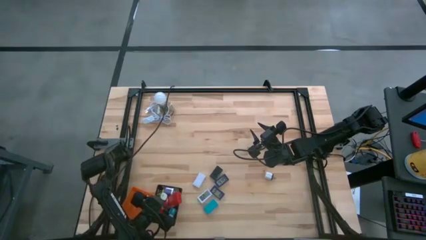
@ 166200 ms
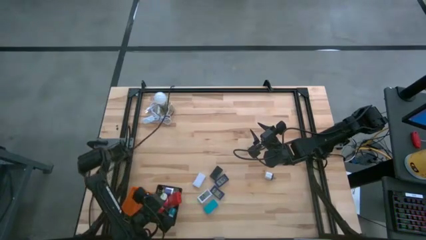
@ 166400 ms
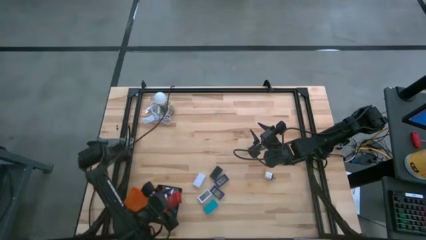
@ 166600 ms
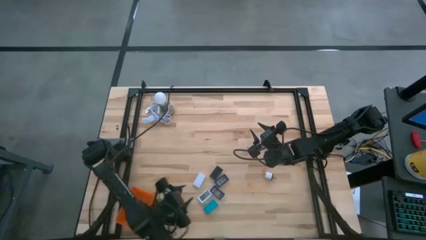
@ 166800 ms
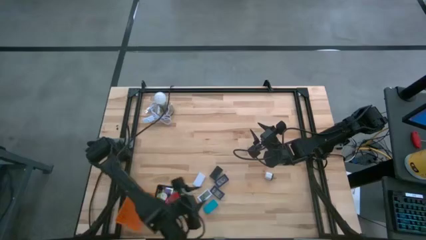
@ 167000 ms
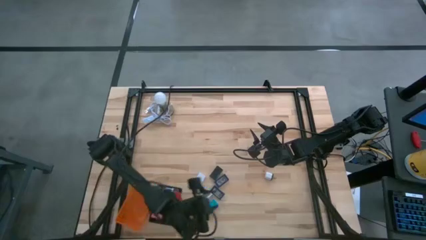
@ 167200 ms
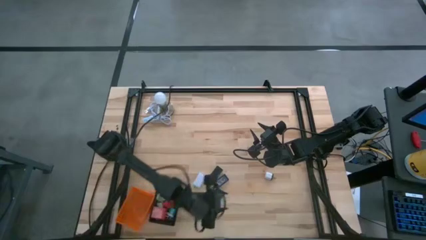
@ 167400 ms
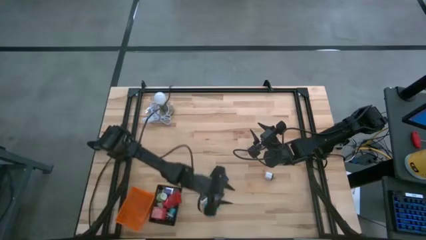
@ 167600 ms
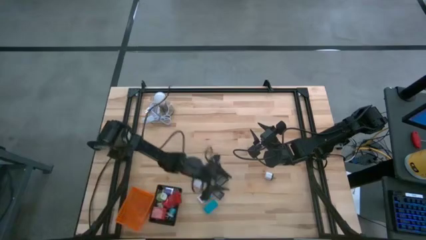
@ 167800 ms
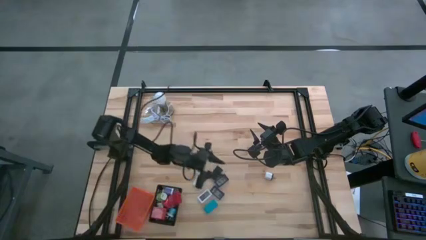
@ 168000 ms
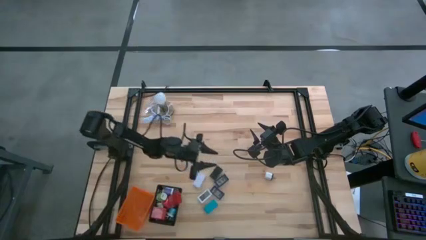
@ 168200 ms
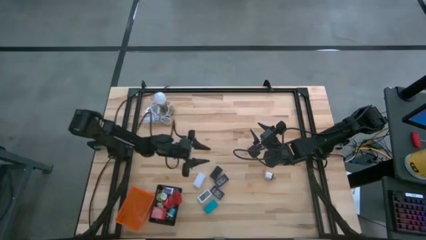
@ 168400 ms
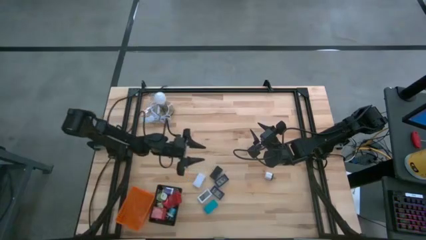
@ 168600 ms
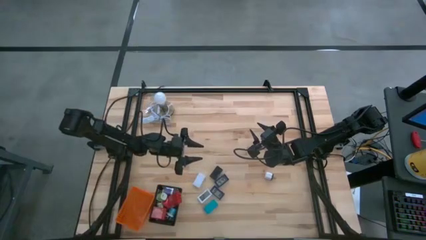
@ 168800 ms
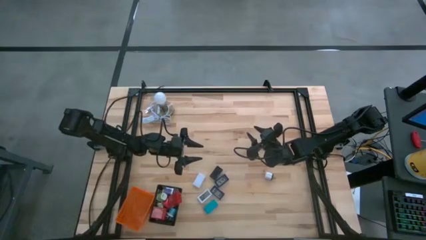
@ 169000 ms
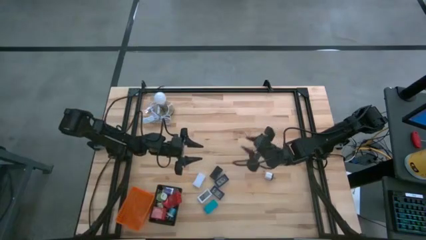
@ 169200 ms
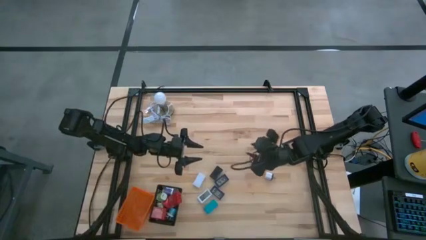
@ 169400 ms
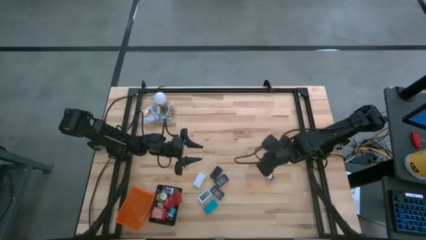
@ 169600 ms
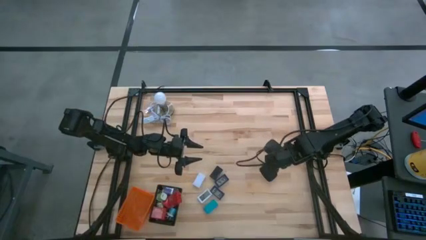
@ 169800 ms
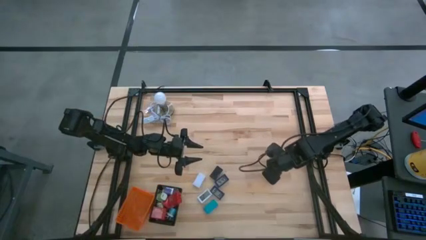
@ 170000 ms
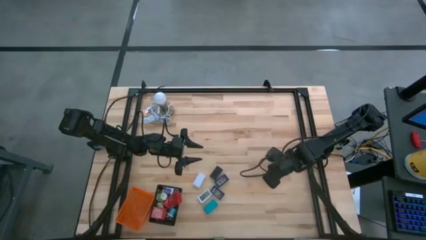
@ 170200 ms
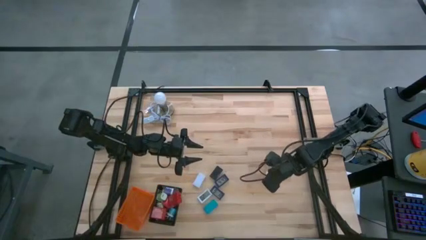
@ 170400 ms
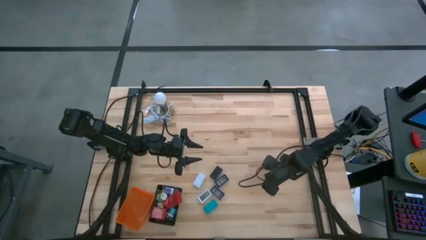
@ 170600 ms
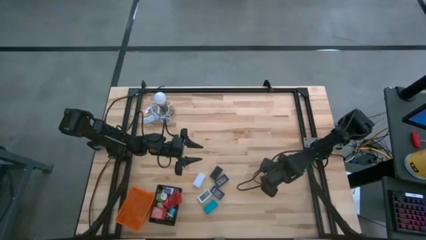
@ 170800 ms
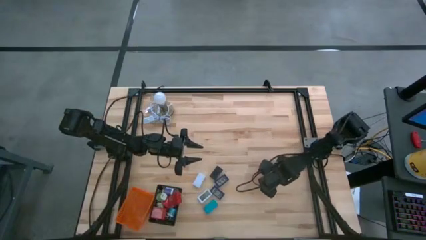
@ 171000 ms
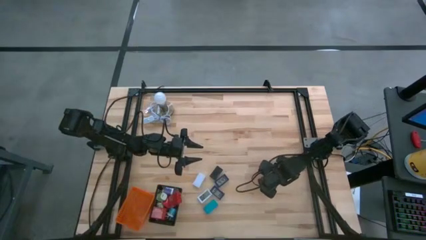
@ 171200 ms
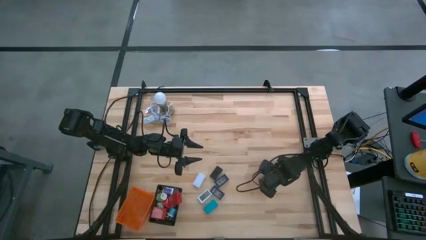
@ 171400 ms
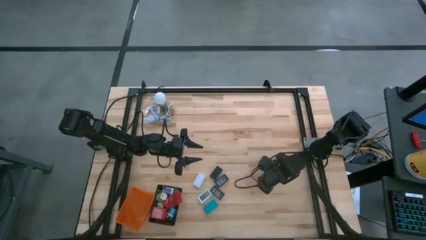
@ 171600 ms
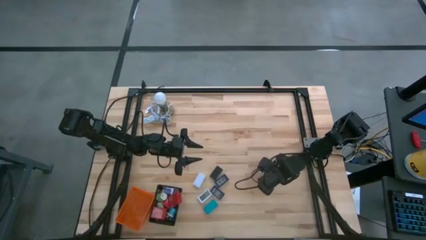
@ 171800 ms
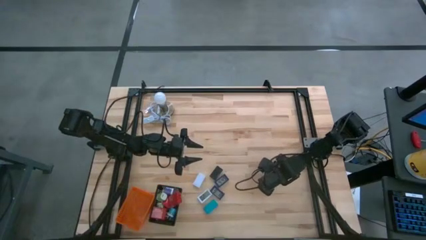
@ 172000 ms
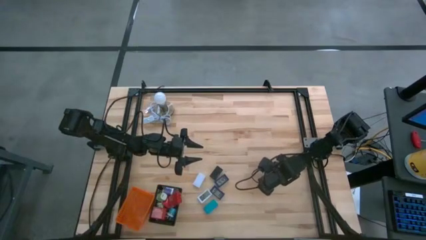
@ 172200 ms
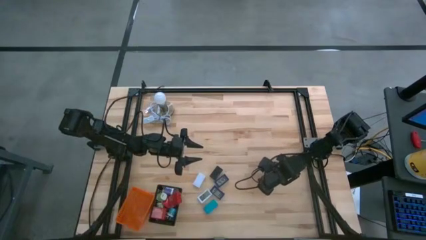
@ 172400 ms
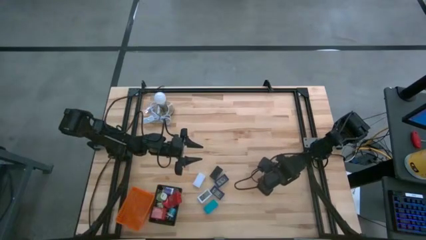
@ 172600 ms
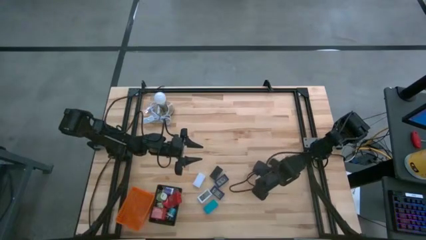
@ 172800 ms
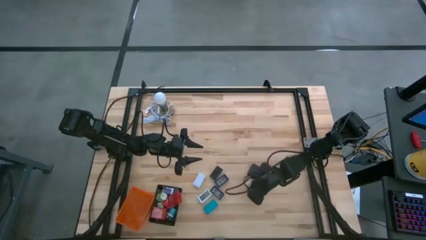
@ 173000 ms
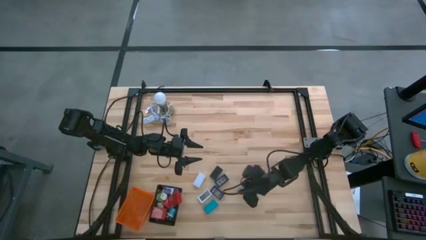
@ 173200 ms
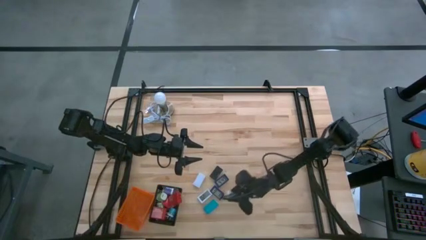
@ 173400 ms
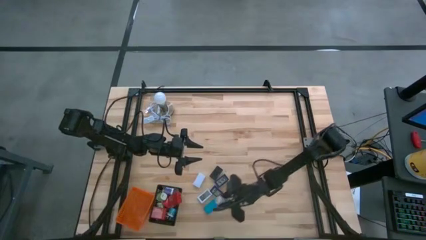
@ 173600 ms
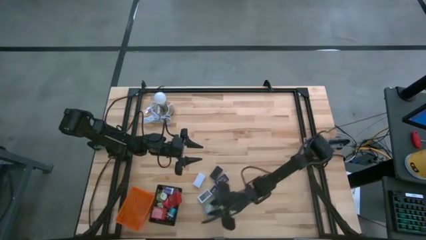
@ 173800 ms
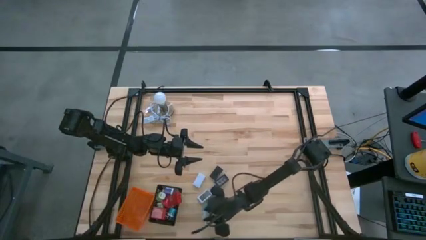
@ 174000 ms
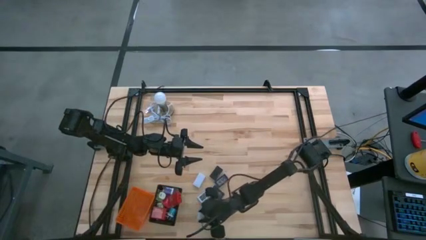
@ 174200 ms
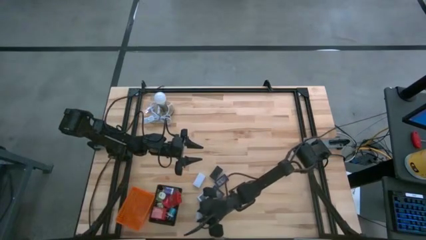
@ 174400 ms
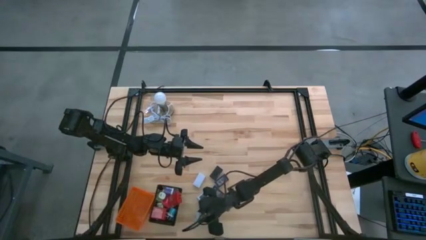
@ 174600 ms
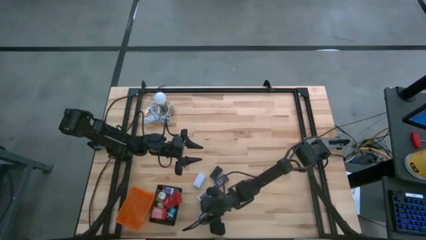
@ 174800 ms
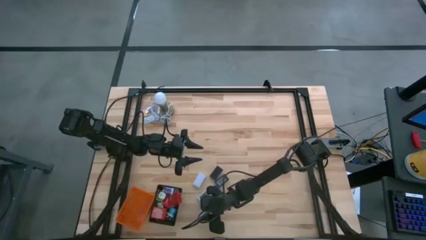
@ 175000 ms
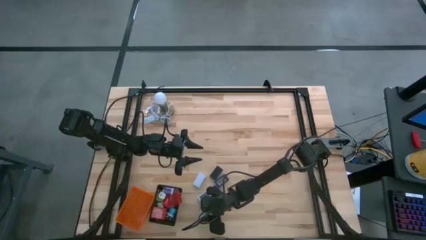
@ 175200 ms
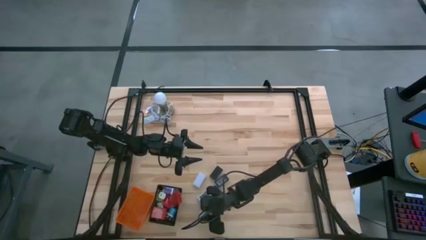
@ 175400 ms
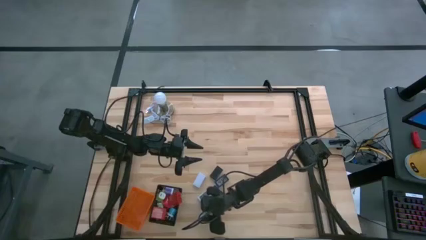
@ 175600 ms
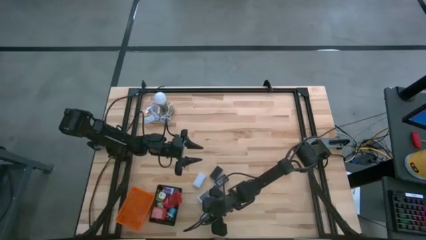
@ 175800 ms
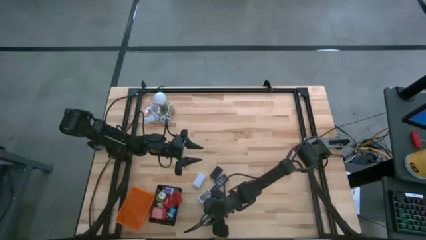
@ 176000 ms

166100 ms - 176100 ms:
Task: Pick & Place Office items
Put the white charger adapter into the black basket
